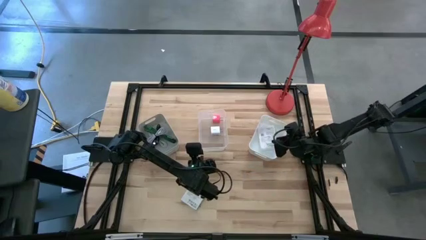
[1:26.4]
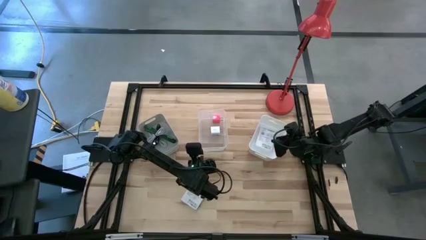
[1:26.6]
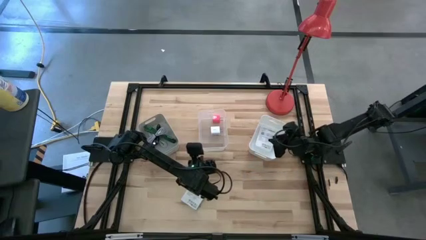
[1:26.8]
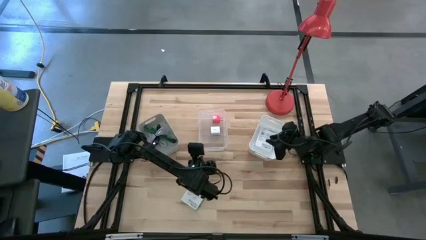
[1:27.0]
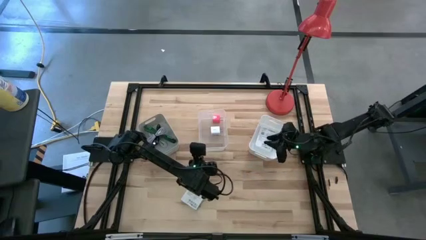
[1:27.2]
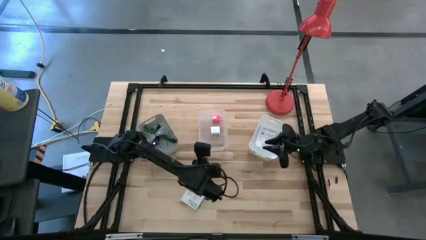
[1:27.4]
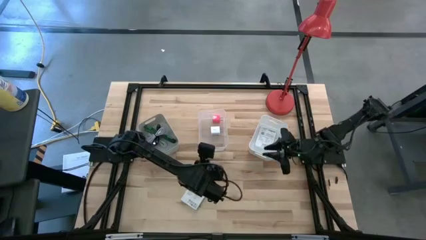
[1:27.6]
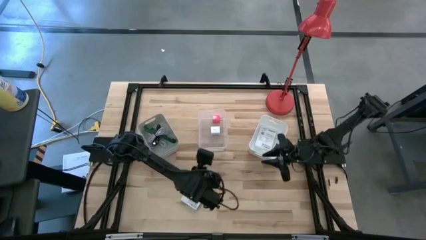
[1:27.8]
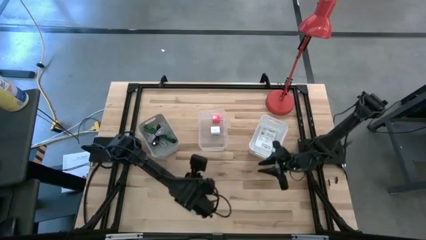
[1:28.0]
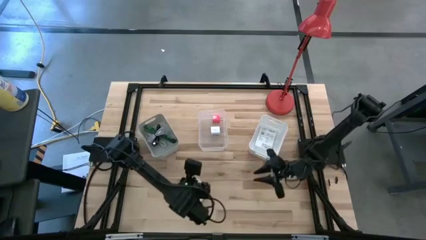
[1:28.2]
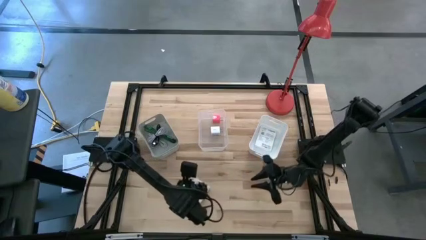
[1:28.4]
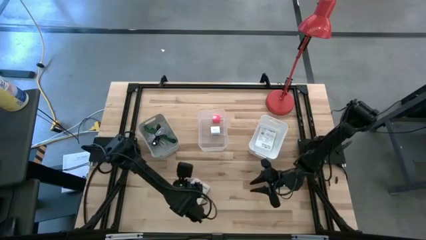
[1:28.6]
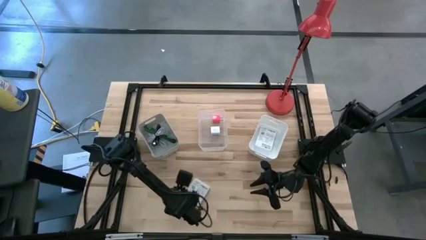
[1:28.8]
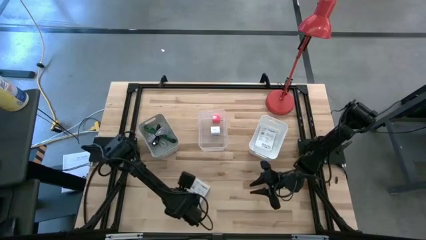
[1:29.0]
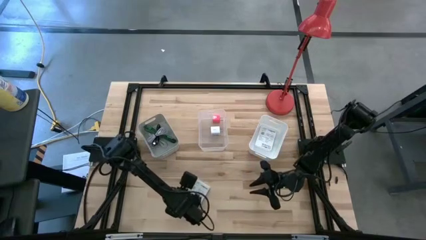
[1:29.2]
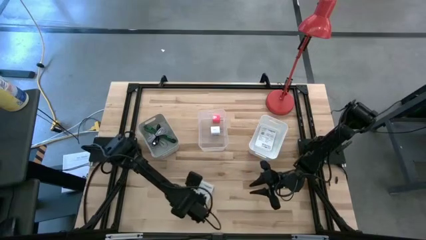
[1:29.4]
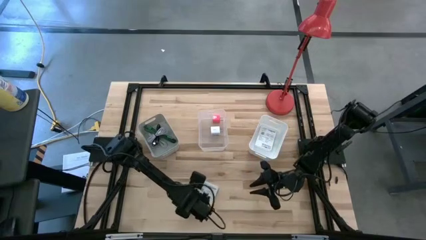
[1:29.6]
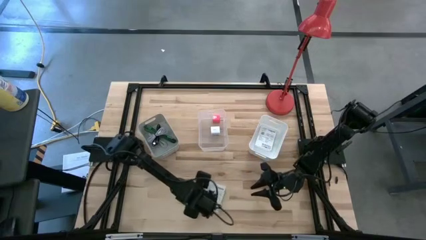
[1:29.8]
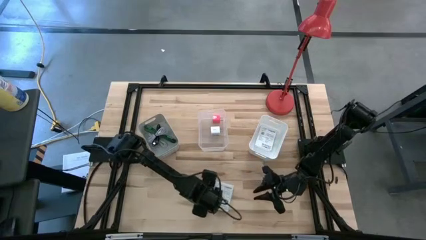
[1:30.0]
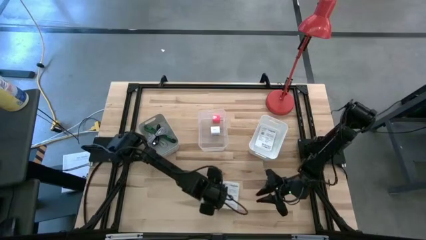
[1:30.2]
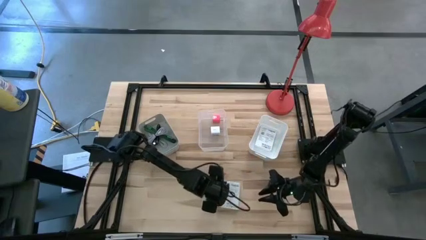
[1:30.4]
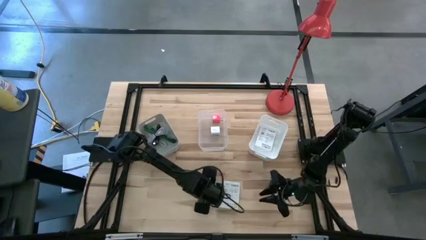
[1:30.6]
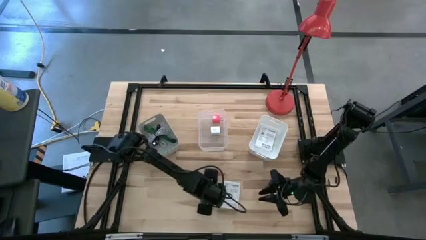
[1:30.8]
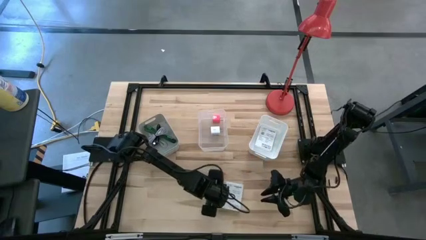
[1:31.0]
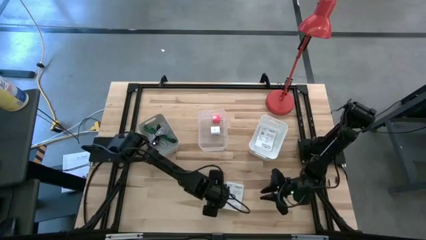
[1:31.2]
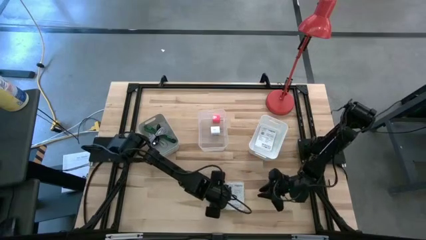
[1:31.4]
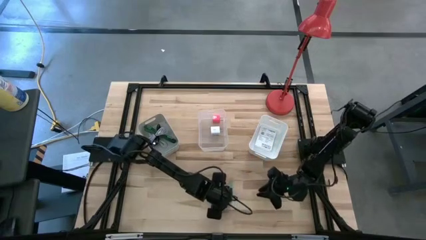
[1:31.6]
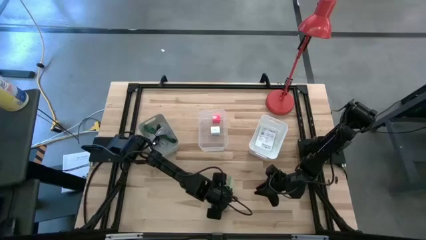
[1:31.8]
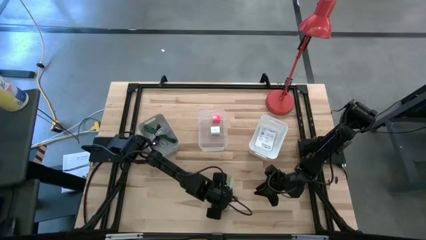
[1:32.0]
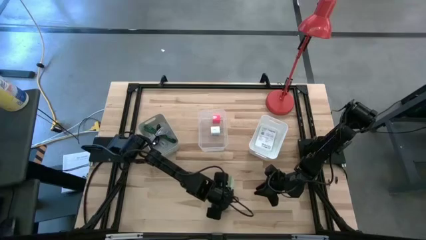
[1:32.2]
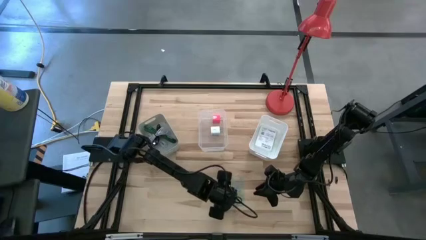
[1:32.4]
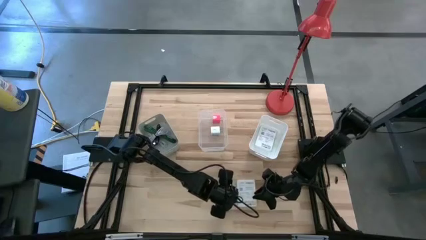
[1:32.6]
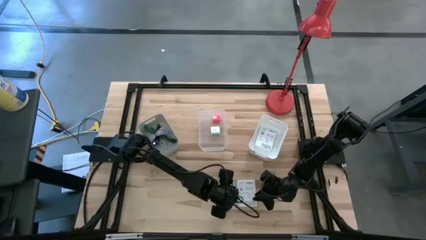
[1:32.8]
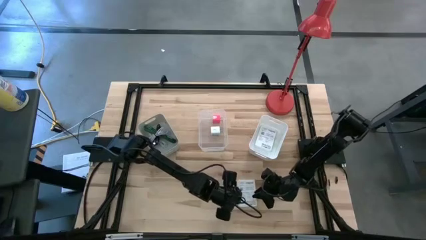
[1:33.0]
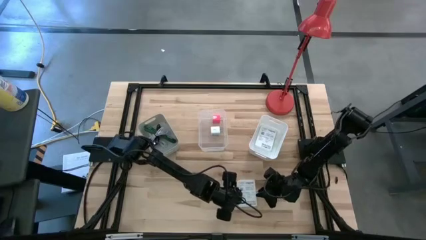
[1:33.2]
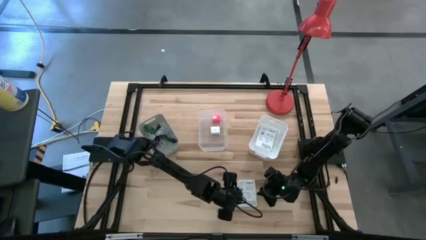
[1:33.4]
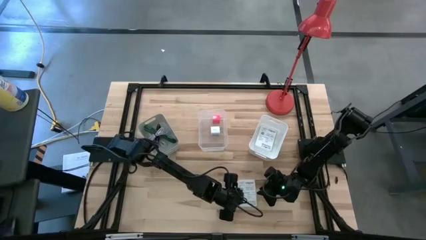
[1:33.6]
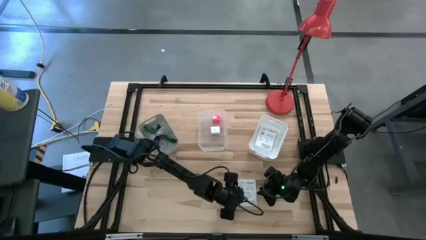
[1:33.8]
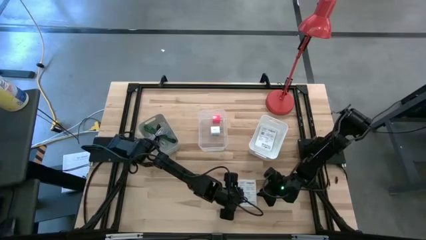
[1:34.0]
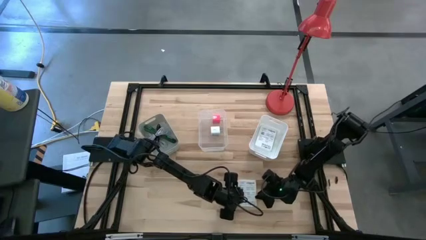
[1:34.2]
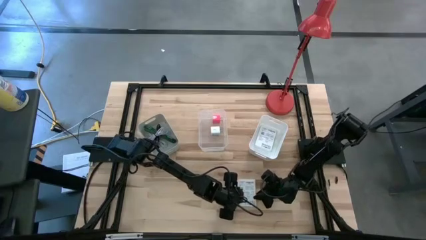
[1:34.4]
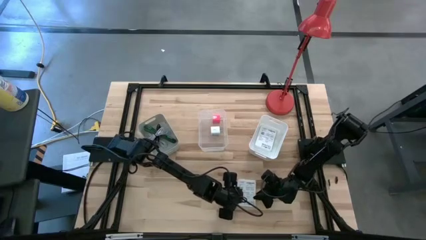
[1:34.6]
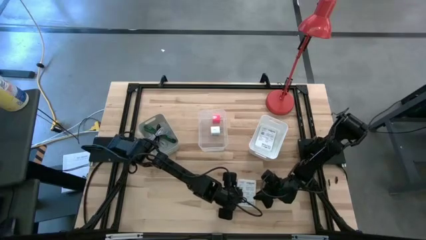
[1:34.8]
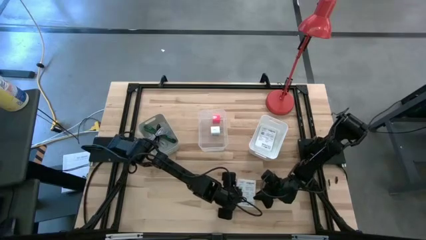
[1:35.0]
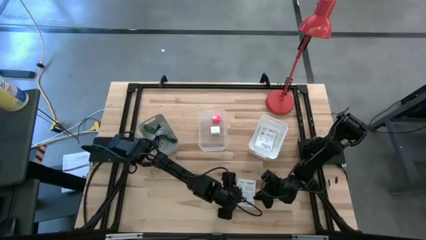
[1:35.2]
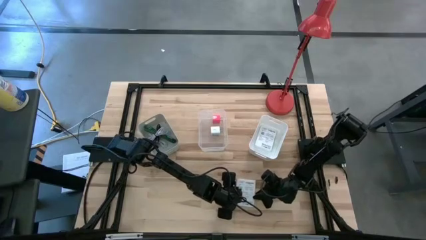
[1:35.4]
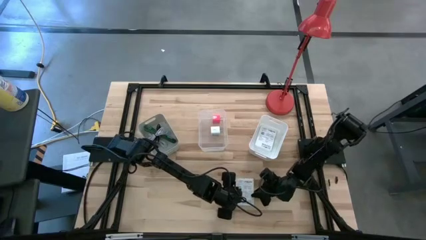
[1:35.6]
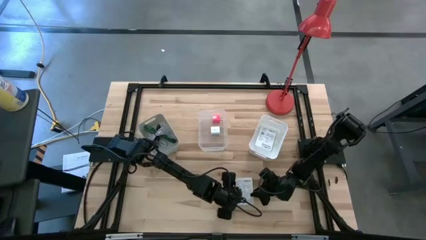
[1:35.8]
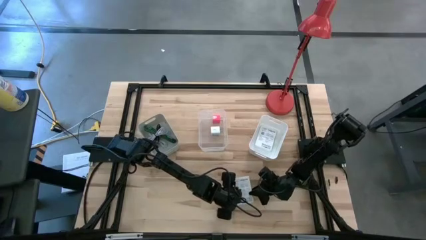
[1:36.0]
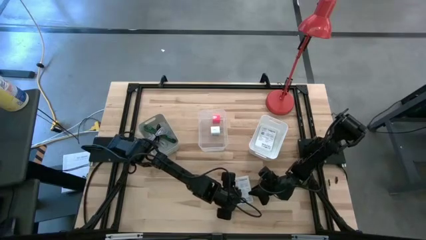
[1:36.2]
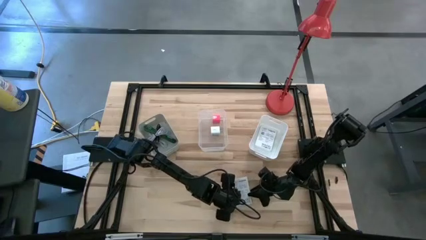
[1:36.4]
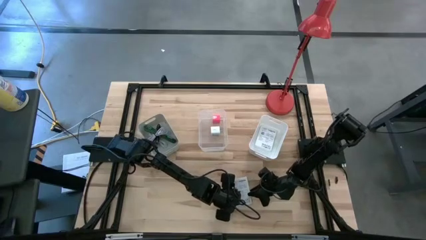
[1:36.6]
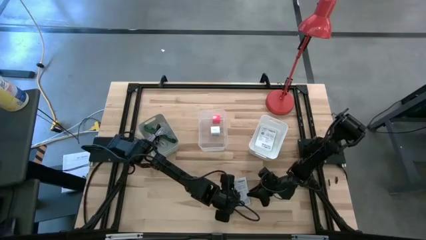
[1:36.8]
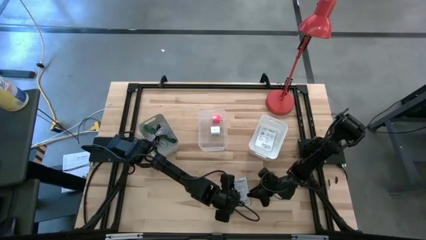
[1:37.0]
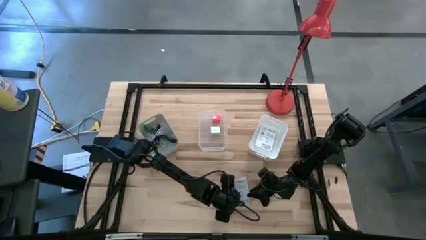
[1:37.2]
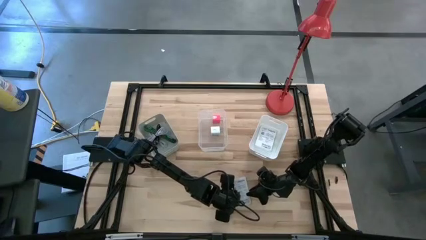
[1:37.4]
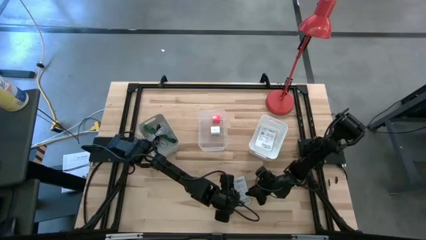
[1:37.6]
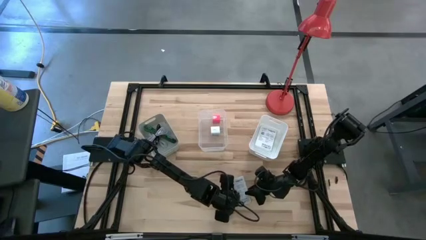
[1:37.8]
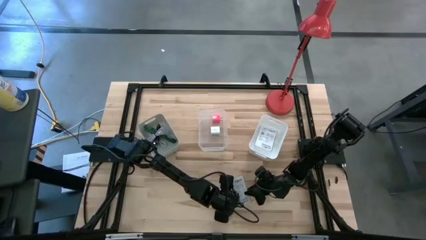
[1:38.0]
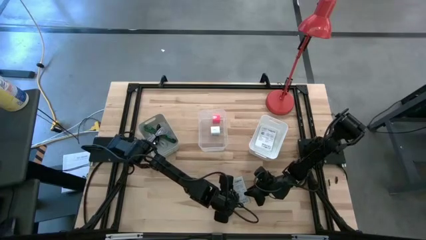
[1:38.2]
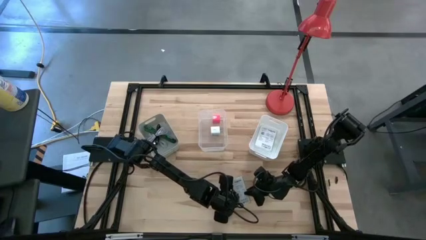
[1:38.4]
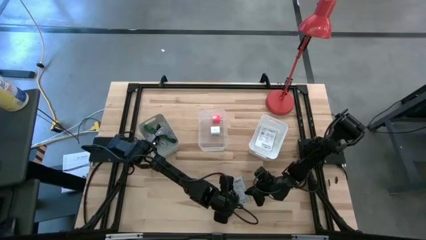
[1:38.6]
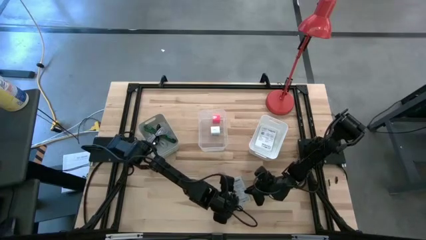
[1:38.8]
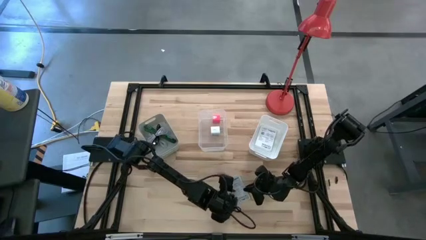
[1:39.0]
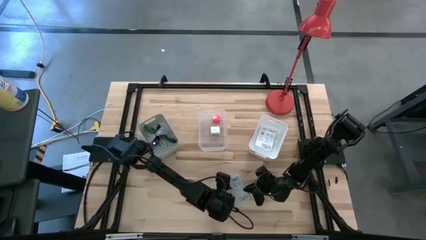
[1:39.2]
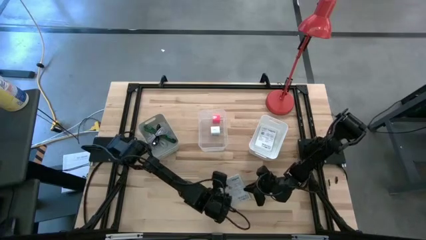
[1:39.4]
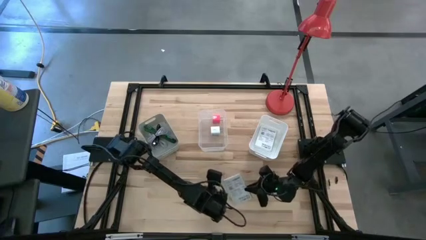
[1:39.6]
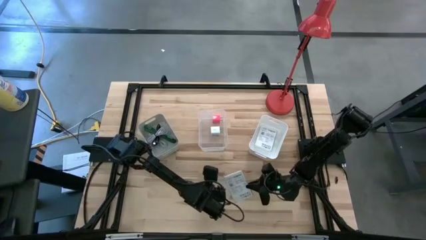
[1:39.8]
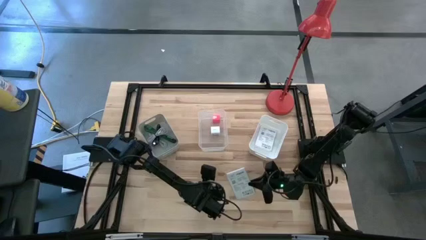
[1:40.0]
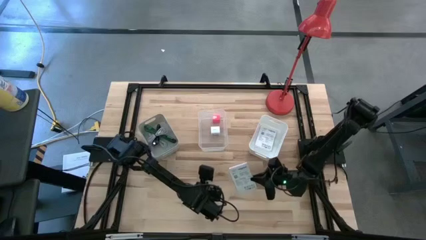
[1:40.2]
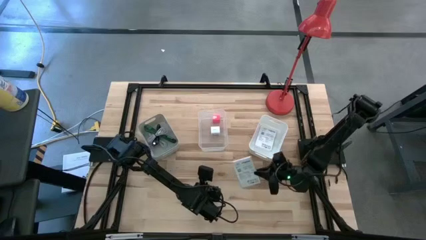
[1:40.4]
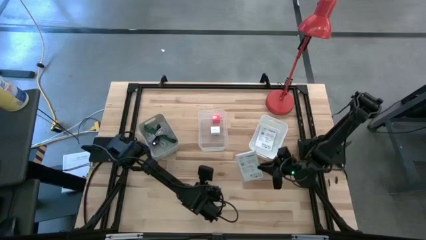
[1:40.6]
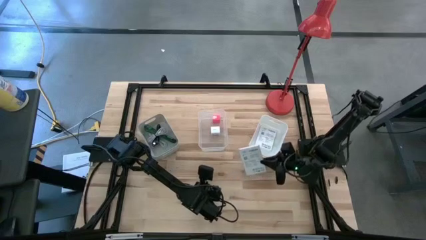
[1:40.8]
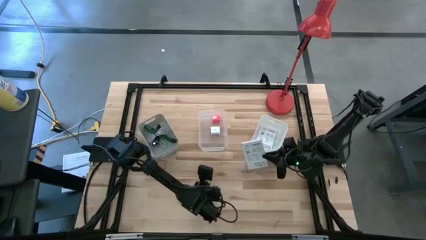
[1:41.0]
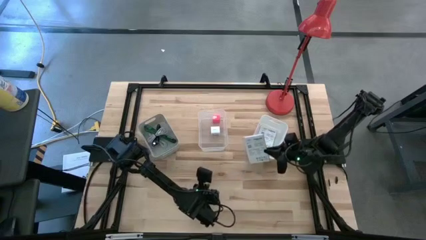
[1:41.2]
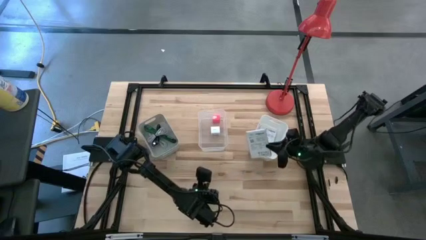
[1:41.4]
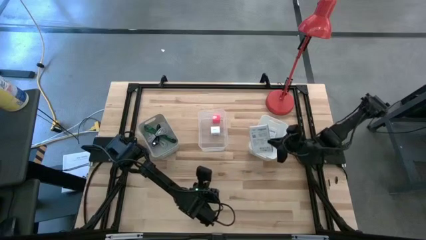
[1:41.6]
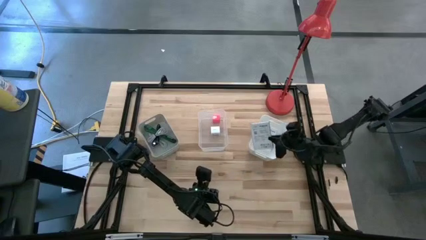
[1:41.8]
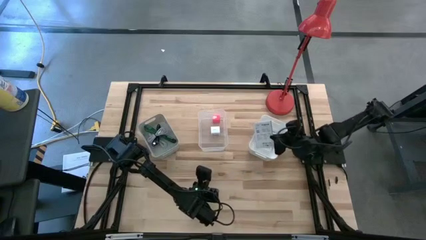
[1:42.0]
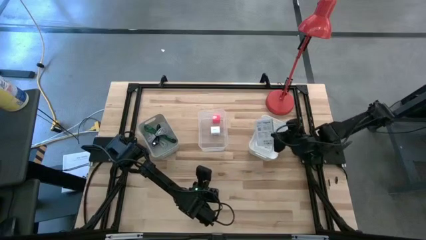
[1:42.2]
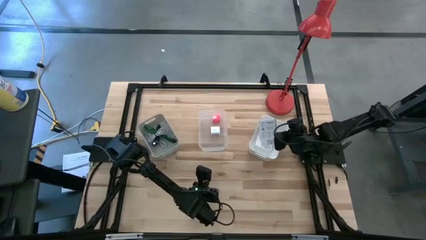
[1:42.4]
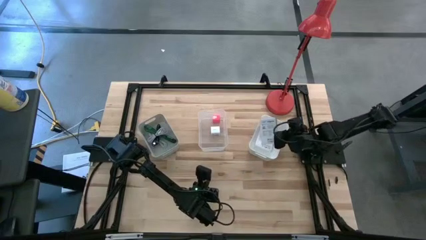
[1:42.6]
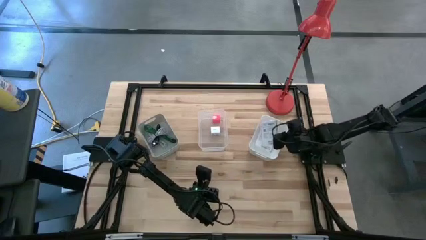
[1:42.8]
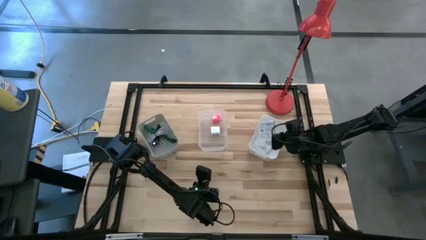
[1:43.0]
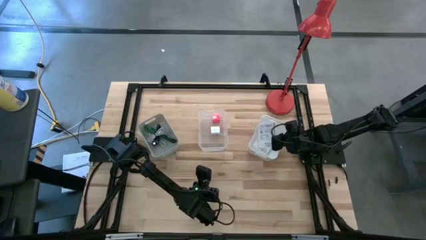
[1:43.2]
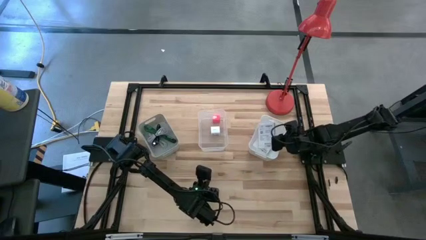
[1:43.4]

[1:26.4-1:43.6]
Task: Pick and place items into bin
Put the card reader box into the white bin
